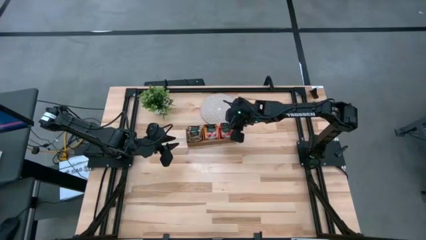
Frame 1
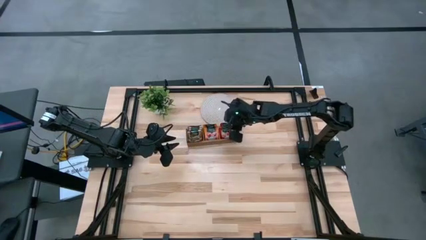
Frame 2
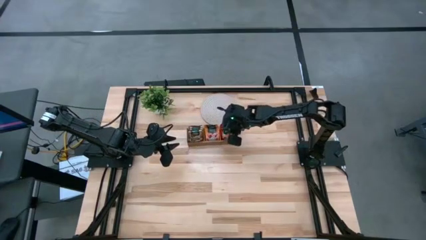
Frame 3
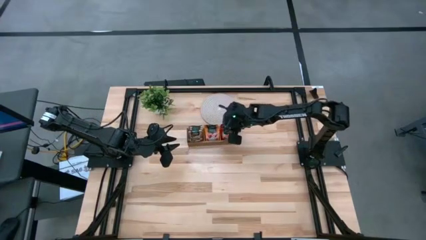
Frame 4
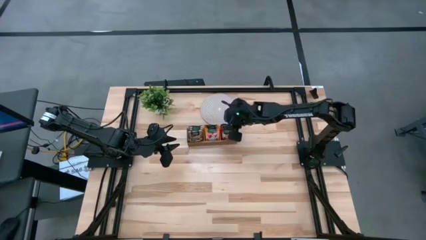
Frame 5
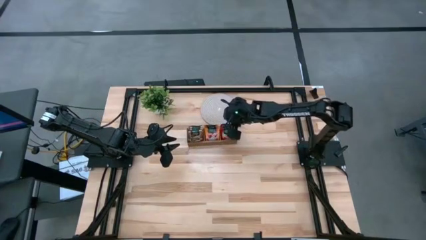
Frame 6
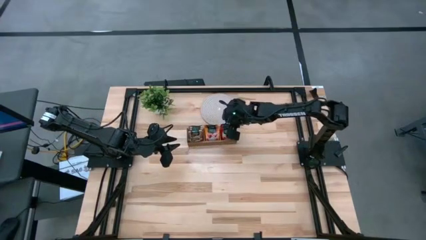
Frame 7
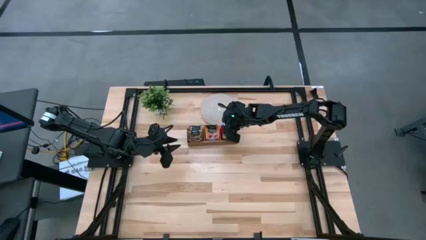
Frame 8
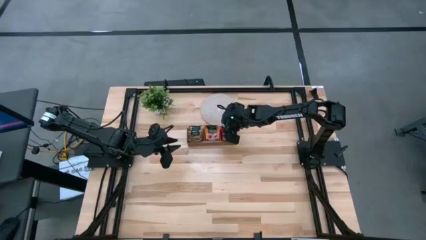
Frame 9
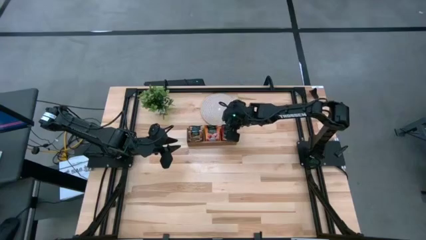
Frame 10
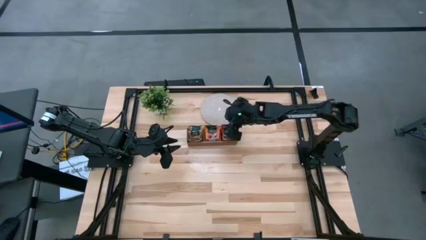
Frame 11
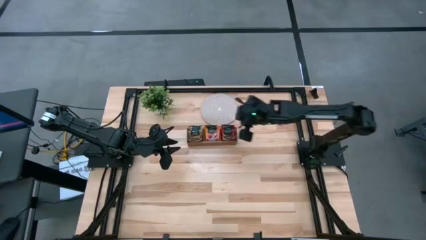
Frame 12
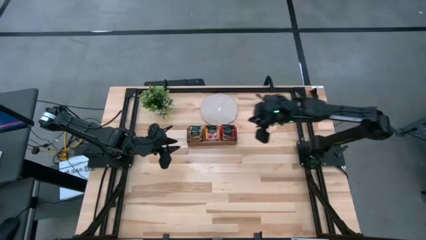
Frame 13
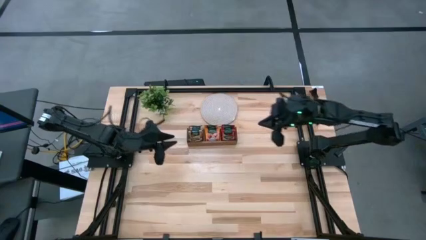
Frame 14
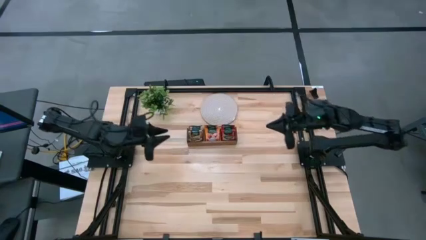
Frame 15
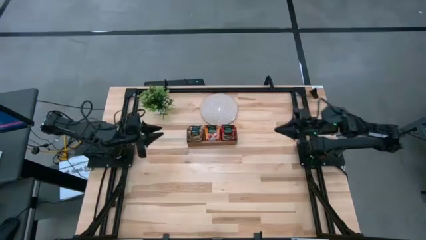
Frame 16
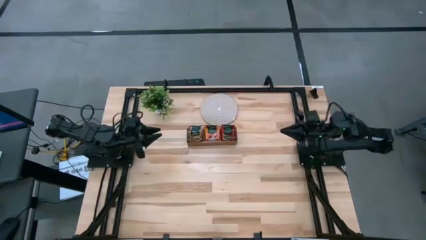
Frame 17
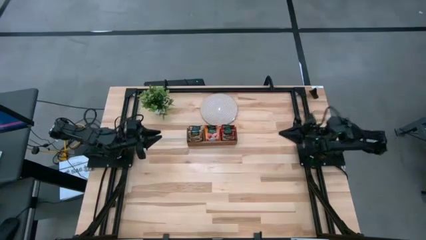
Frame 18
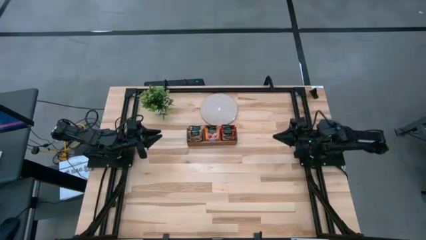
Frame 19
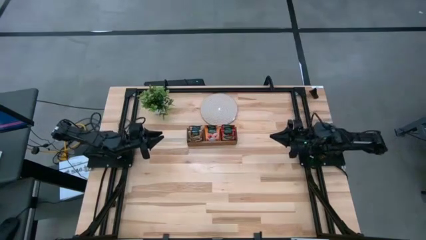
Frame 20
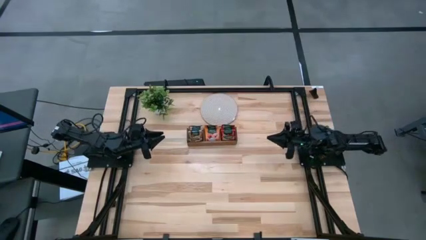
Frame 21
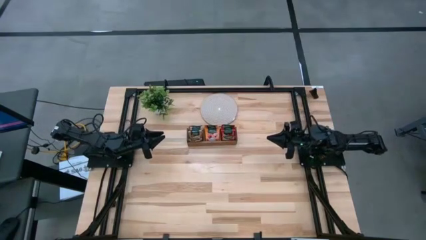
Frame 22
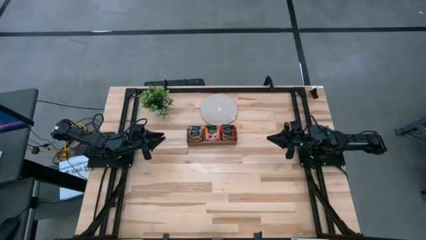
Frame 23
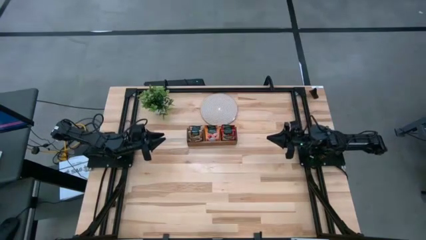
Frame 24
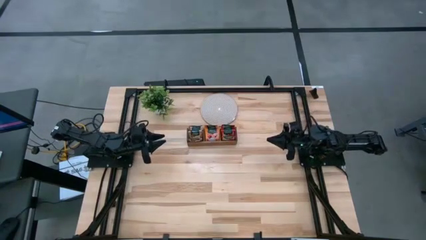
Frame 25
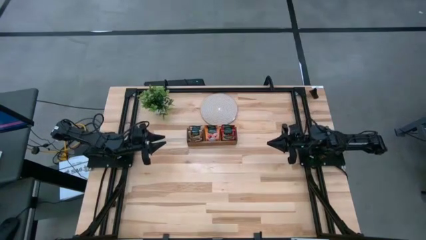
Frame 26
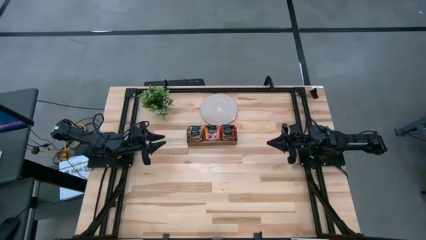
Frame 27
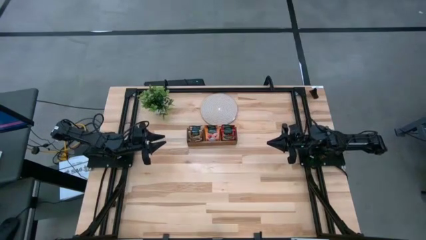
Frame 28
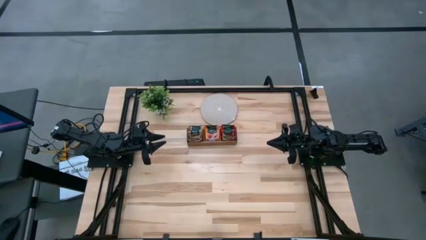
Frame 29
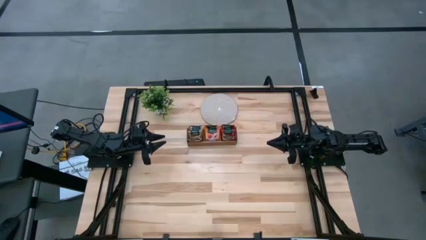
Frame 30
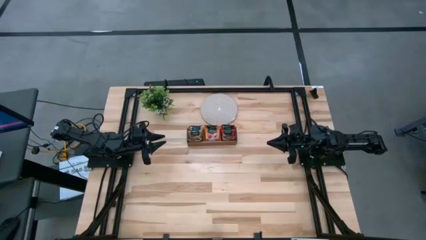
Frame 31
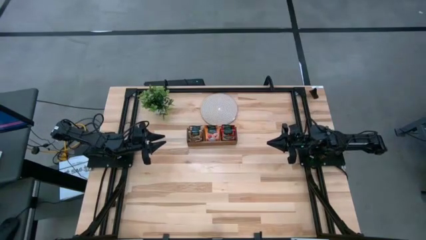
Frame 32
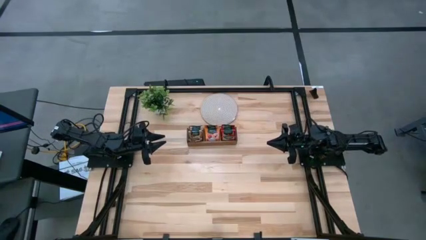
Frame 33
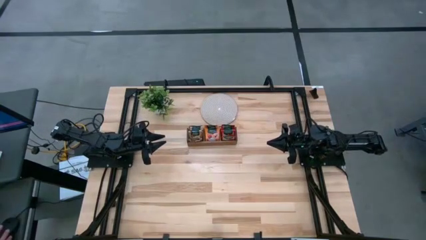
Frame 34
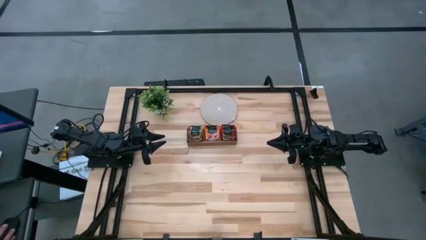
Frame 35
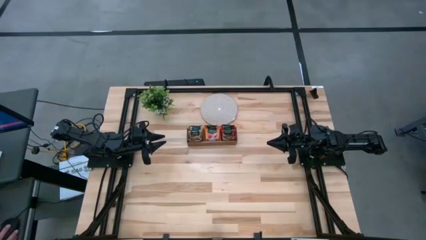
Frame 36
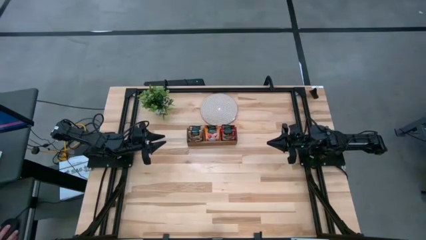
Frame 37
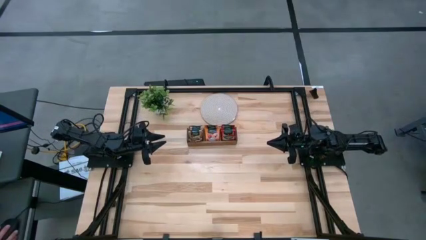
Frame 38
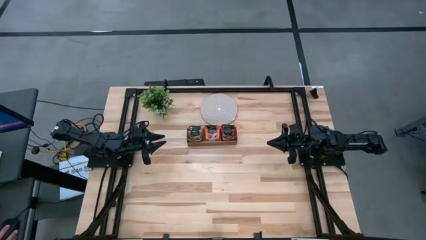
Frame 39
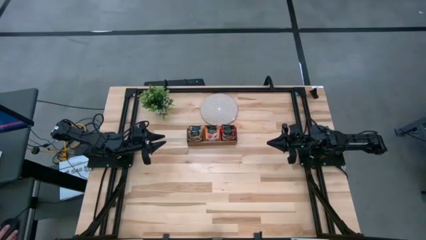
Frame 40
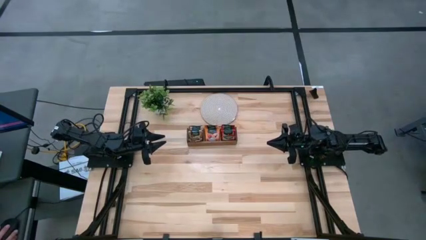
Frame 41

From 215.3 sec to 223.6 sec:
Task: Pick & Place Tea
Return to Home Position

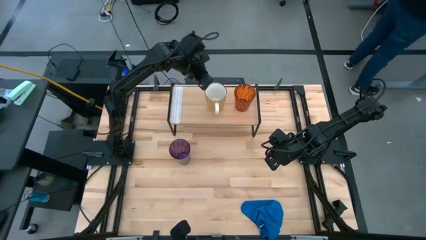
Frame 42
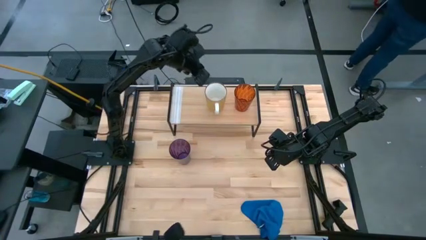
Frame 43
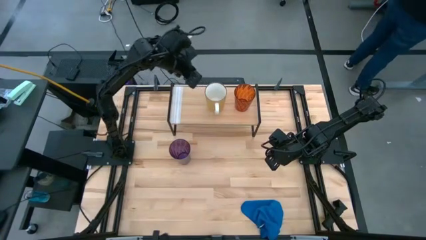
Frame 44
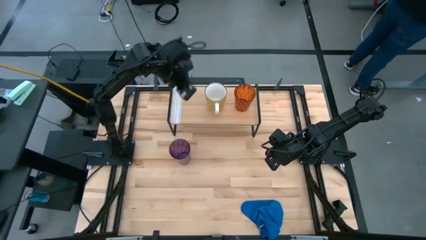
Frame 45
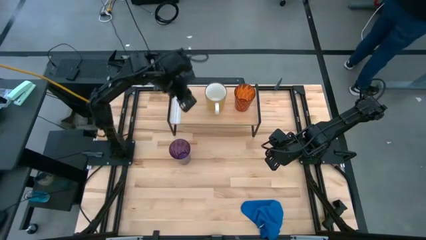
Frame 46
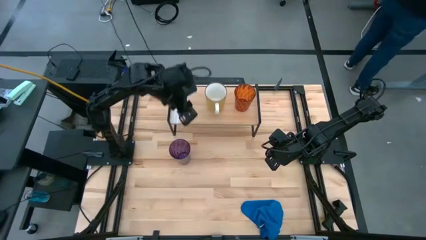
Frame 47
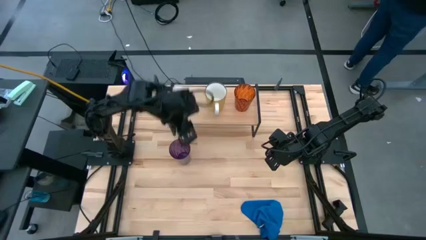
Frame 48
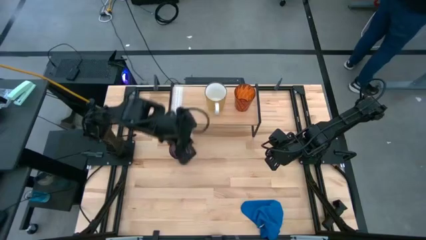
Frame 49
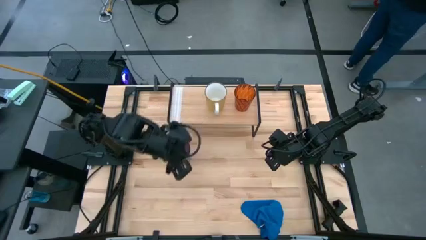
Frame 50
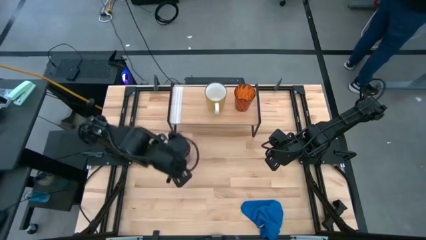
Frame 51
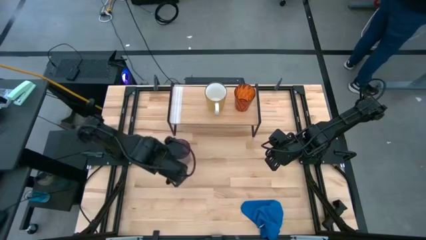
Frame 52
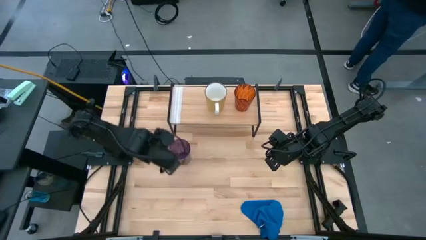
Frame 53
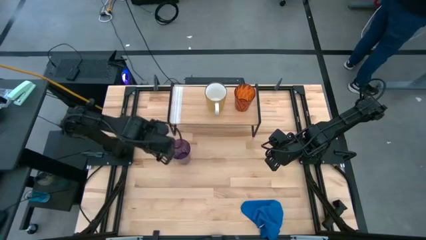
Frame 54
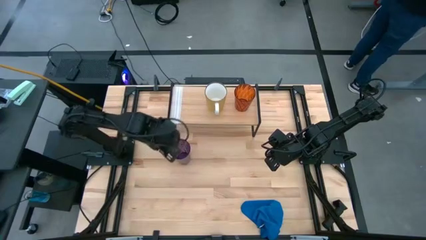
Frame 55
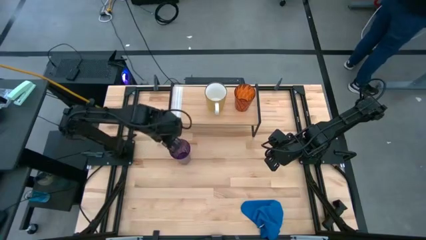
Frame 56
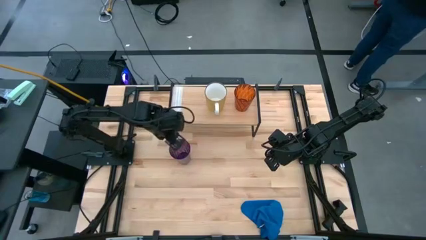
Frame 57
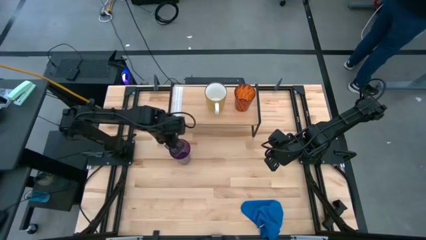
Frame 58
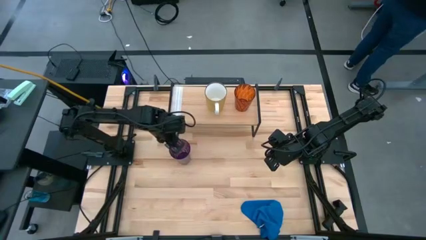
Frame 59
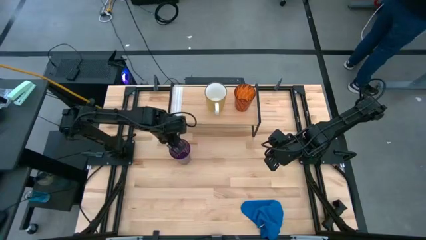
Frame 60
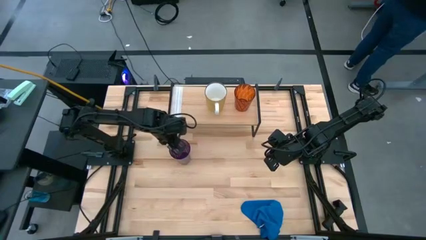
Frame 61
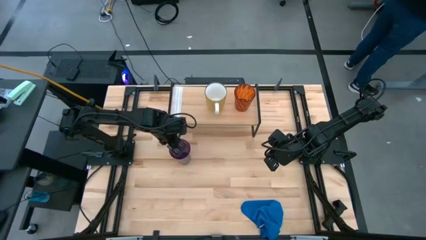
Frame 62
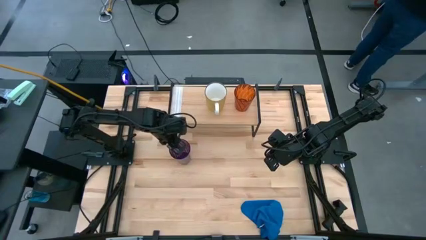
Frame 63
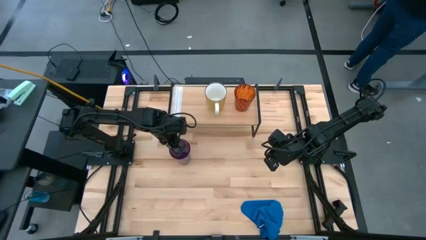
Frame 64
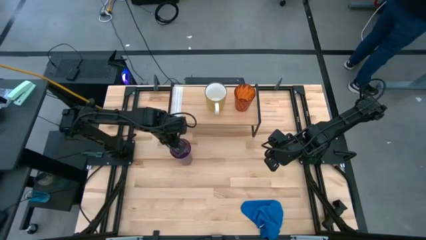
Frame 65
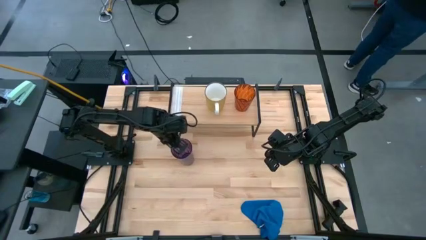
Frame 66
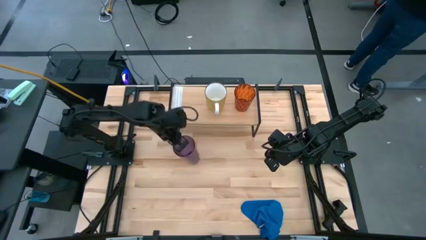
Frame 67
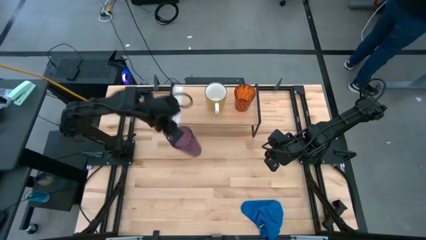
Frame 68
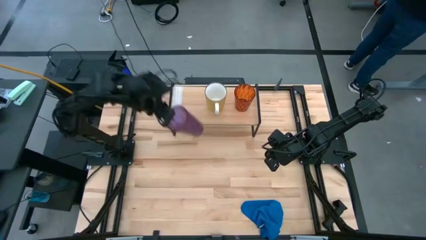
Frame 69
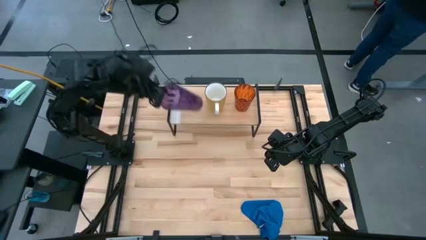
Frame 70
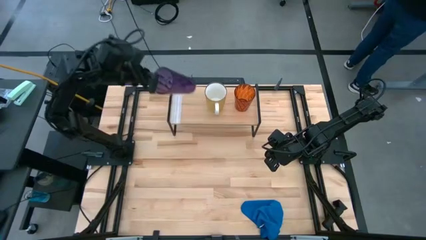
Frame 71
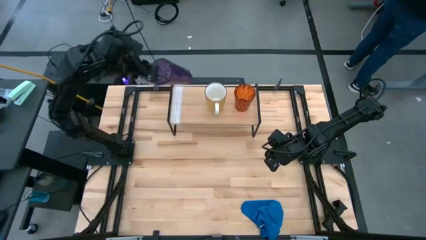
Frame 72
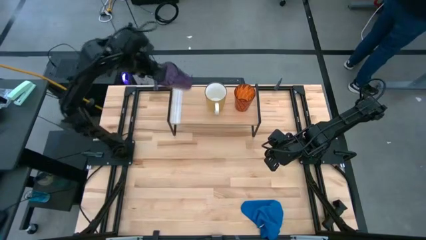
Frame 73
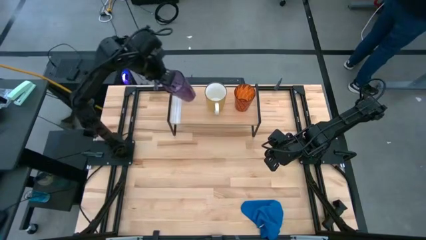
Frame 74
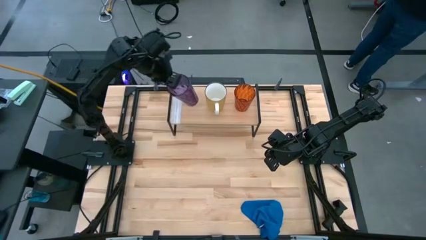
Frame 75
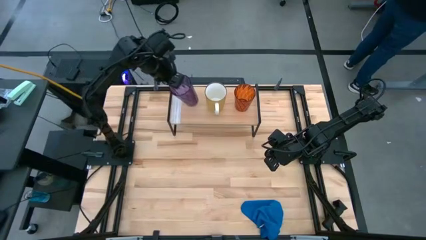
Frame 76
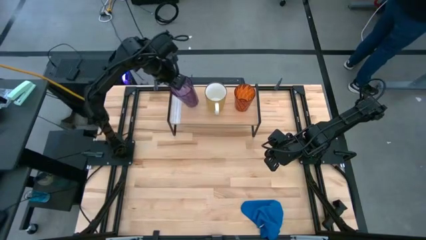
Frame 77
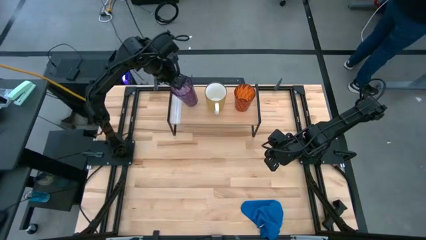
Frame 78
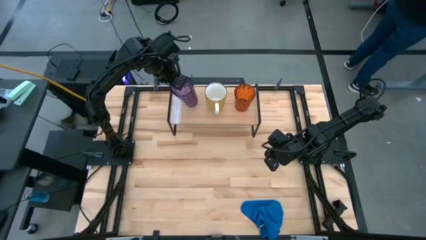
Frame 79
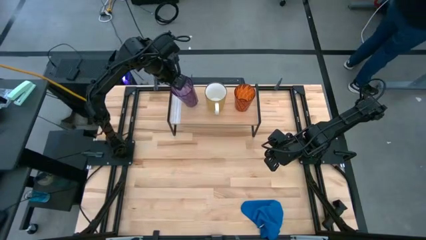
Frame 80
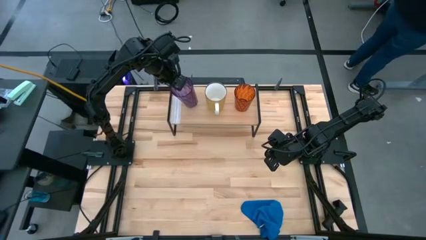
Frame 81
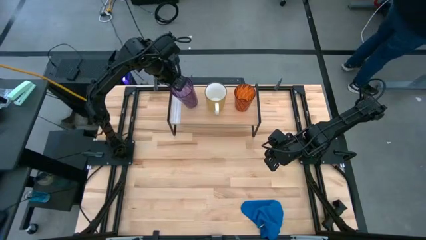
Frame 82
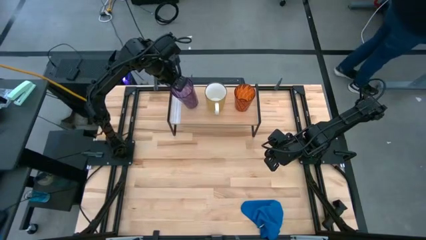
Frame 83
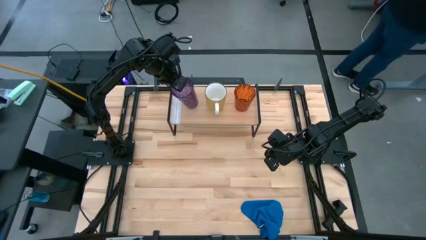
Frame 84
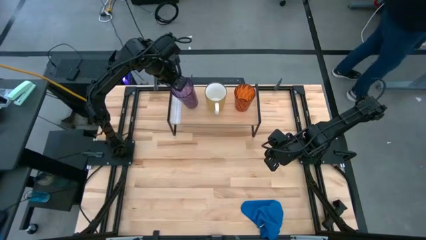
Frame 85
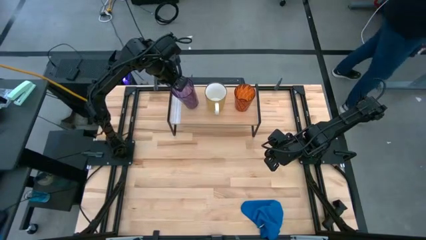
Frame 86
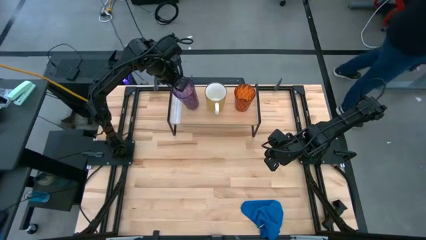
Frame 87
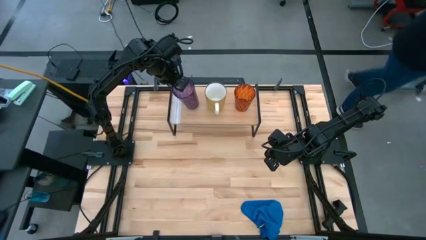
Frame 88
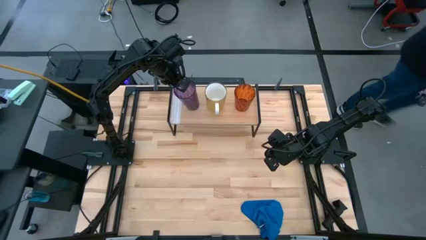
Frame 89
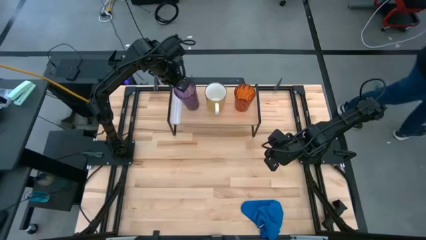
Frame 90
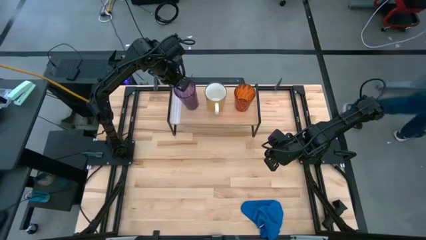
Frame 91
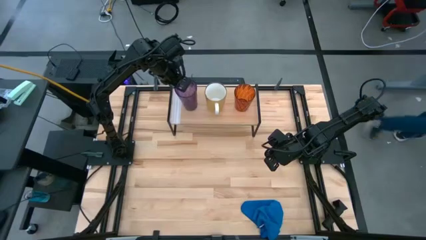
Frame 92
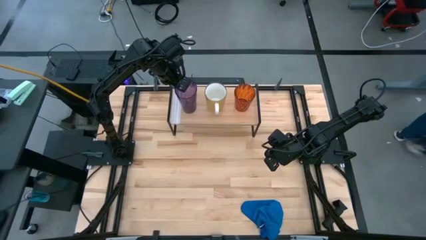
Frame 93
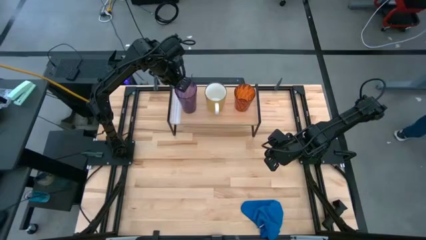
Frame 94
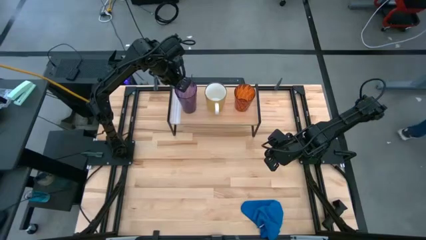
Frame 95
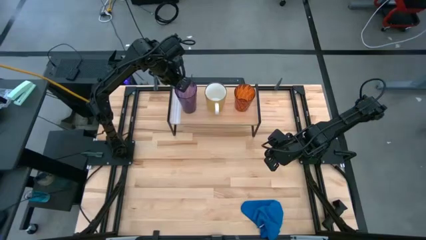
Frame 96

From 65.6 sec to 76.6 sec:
Task: Stack small to large cups/mugs on shelf
Put the purple glass on the shelf
